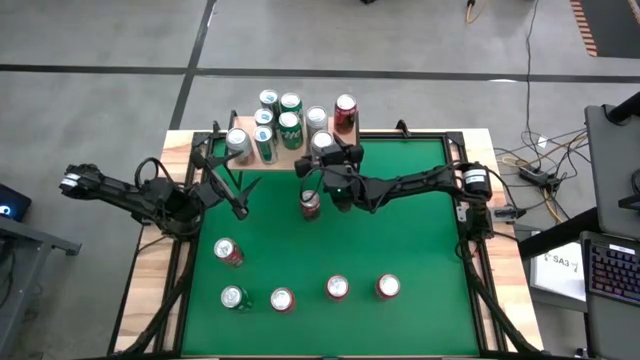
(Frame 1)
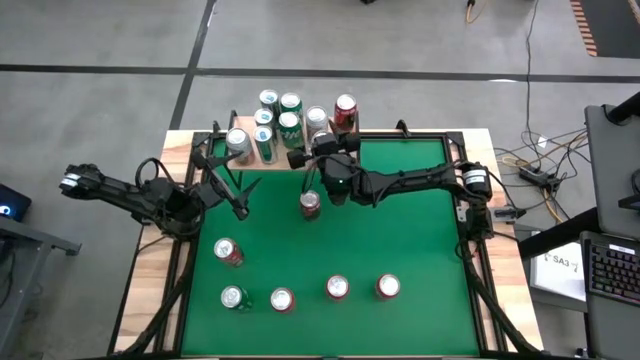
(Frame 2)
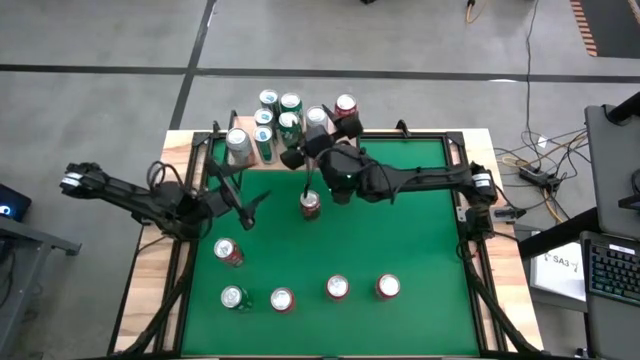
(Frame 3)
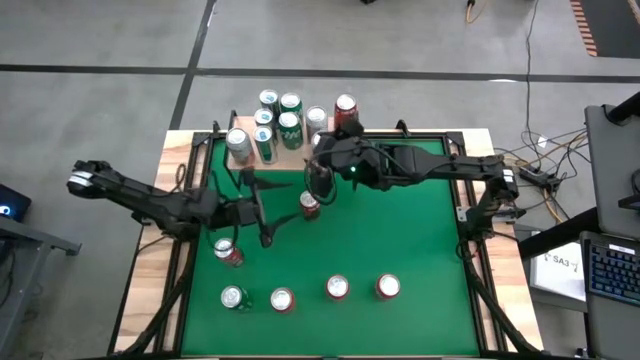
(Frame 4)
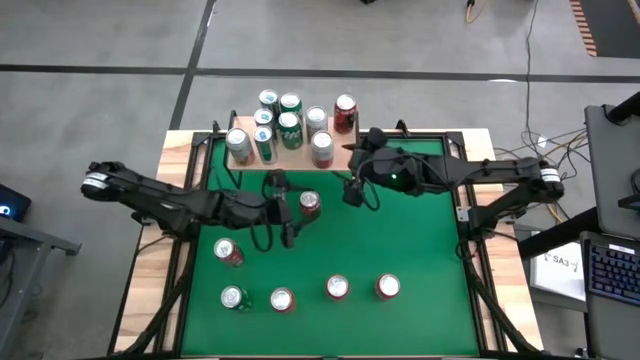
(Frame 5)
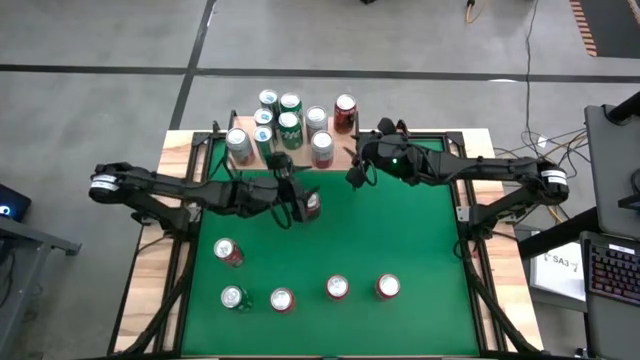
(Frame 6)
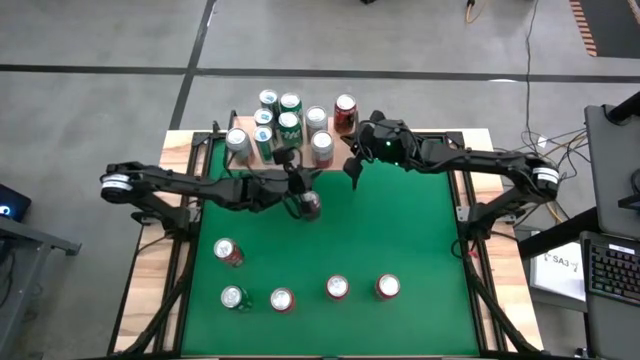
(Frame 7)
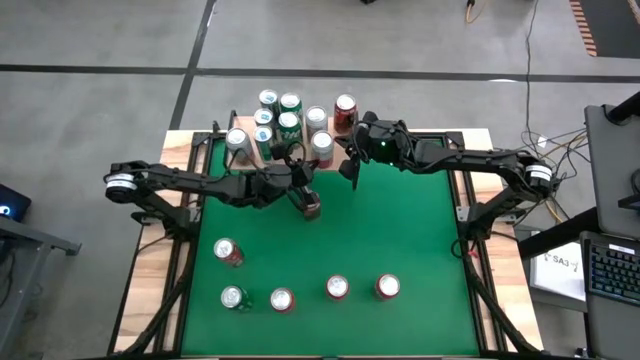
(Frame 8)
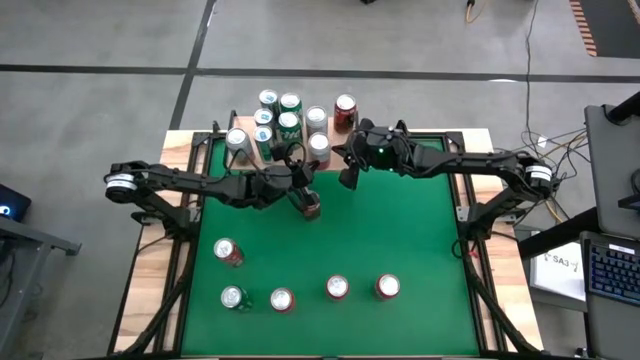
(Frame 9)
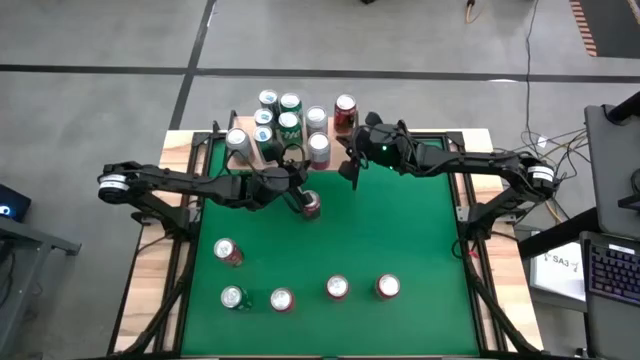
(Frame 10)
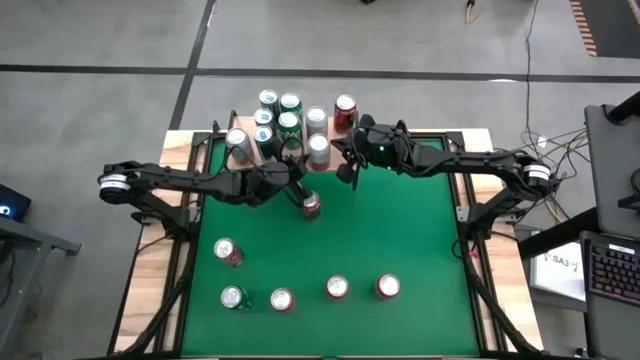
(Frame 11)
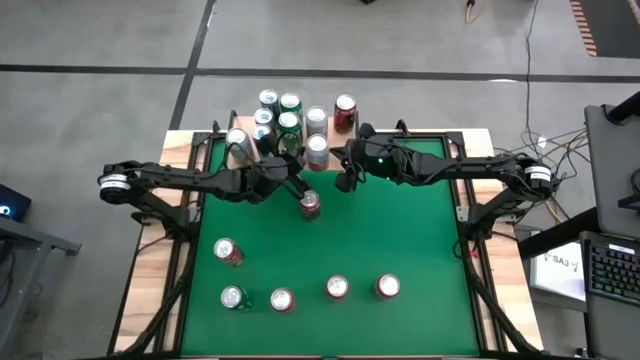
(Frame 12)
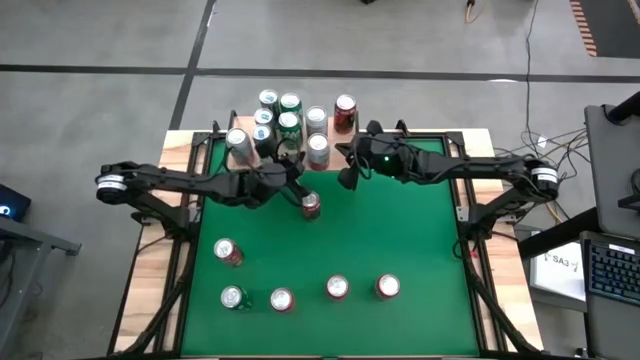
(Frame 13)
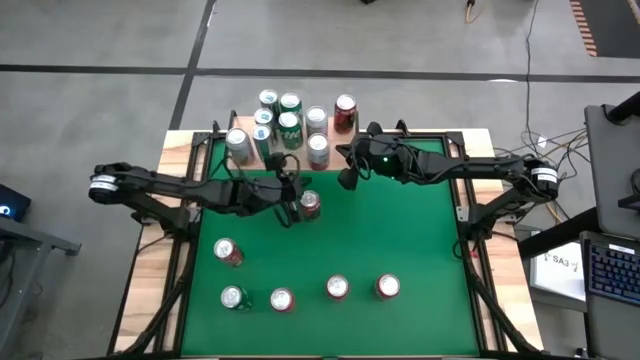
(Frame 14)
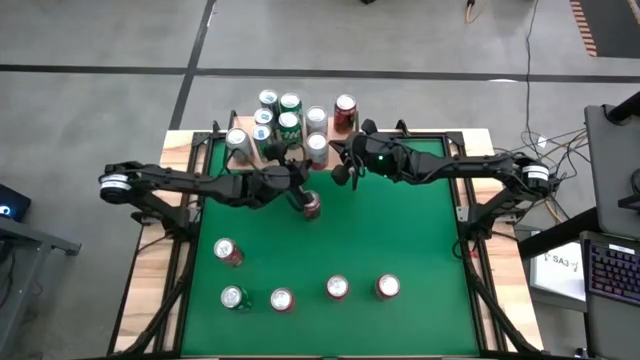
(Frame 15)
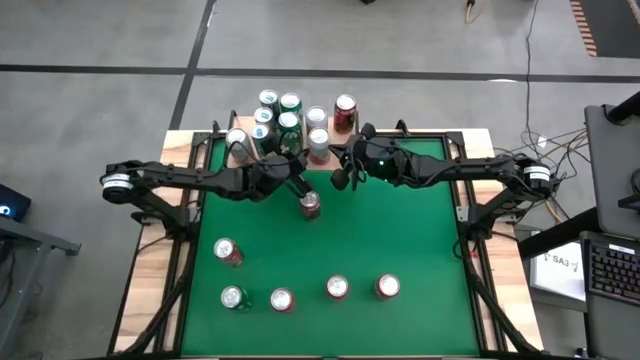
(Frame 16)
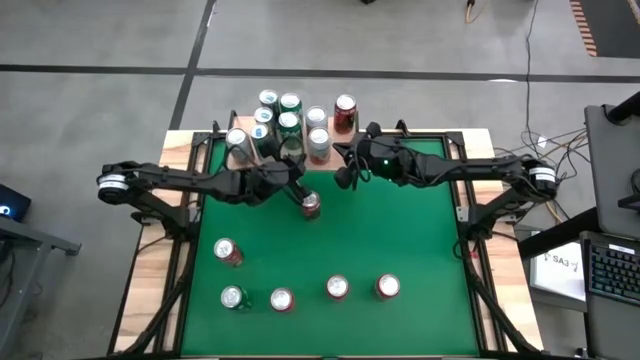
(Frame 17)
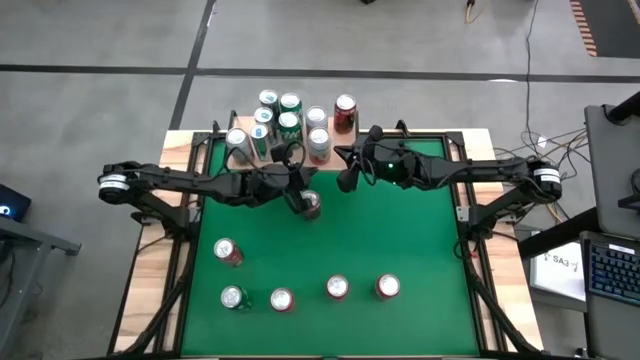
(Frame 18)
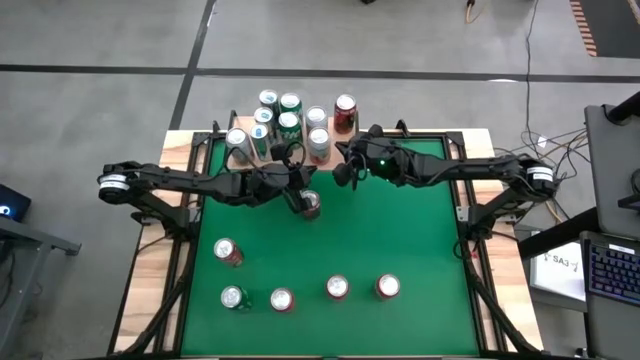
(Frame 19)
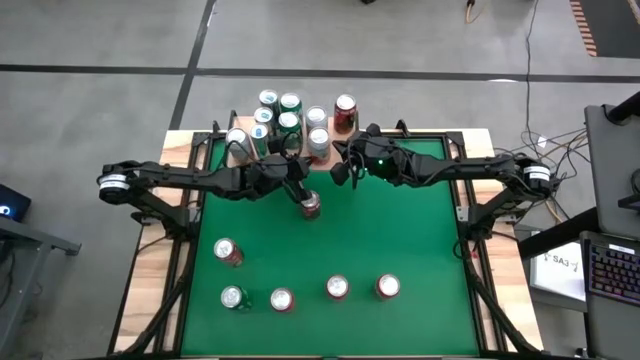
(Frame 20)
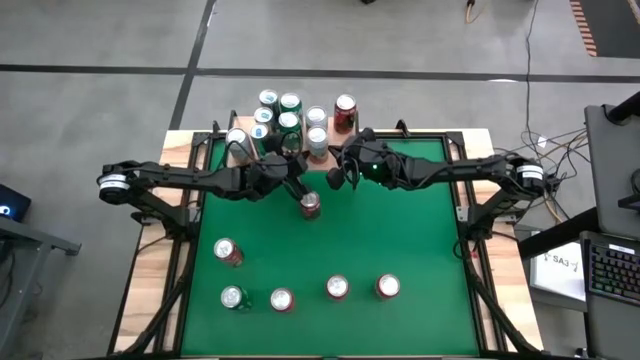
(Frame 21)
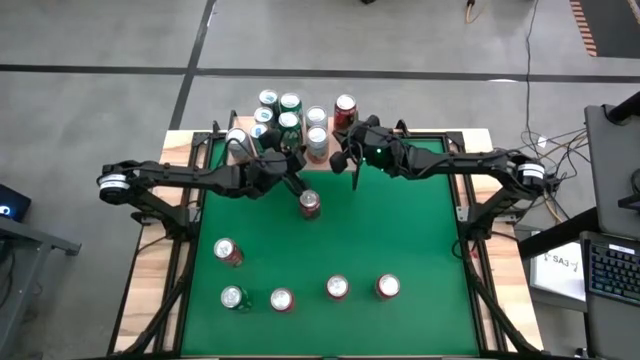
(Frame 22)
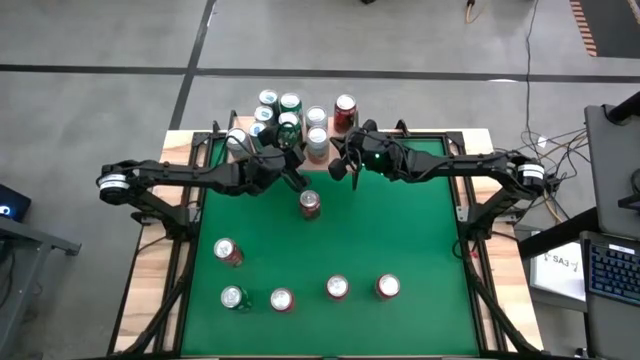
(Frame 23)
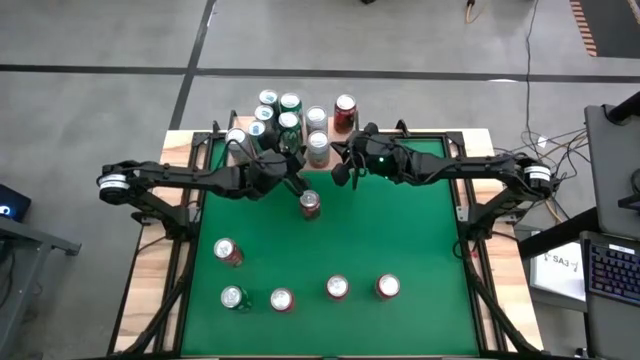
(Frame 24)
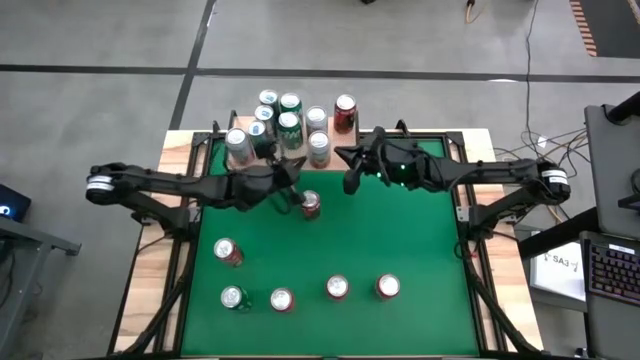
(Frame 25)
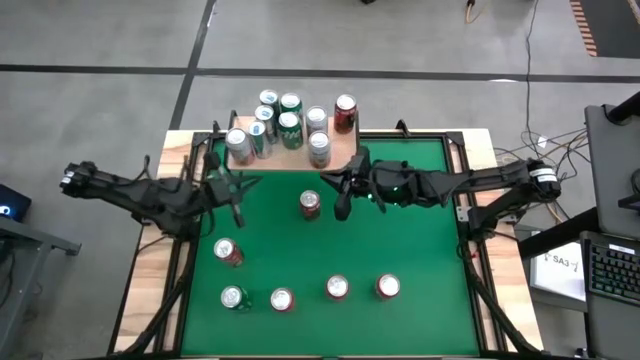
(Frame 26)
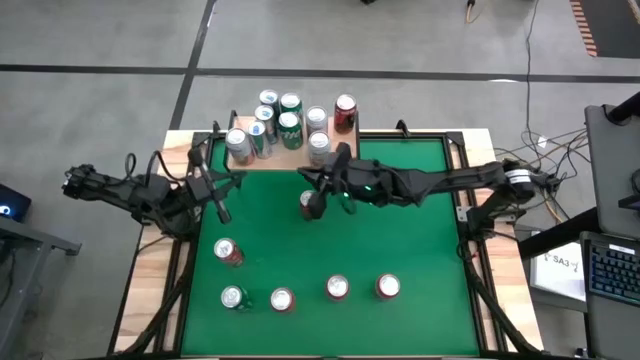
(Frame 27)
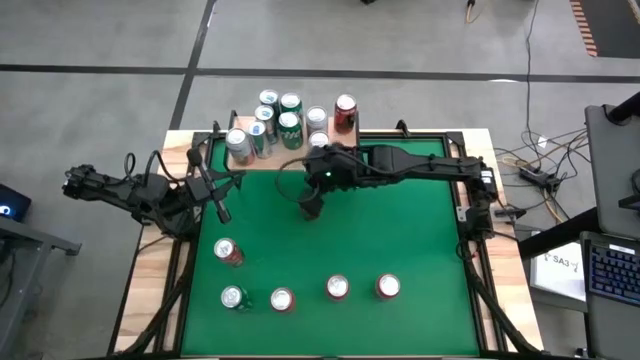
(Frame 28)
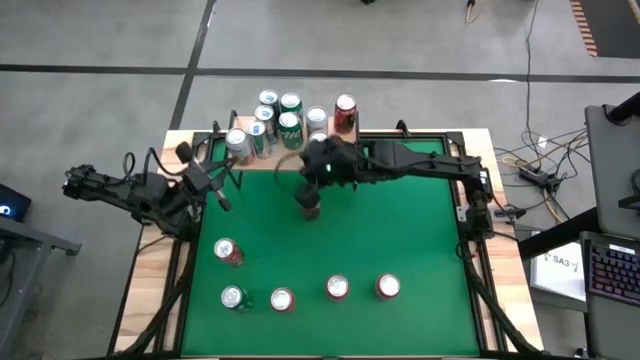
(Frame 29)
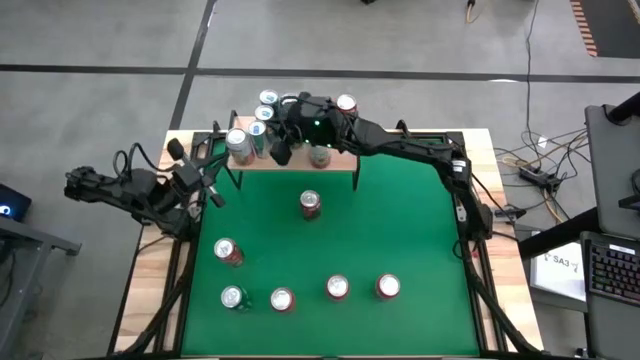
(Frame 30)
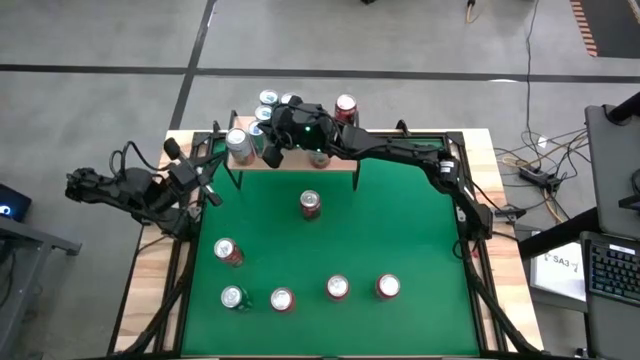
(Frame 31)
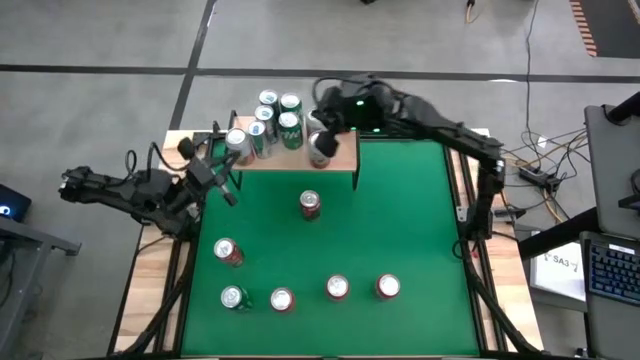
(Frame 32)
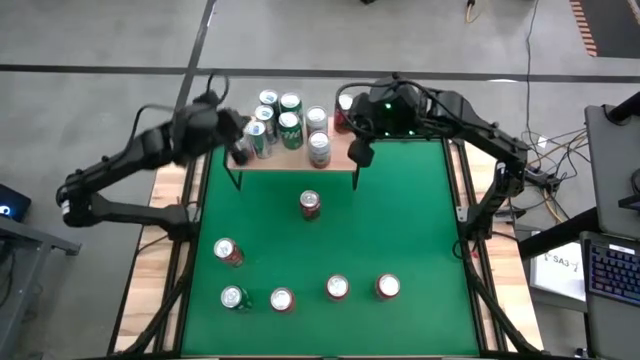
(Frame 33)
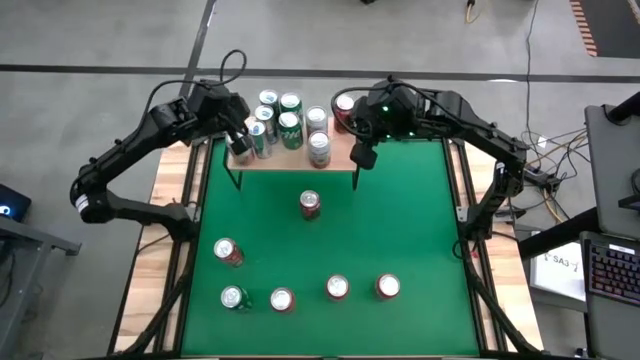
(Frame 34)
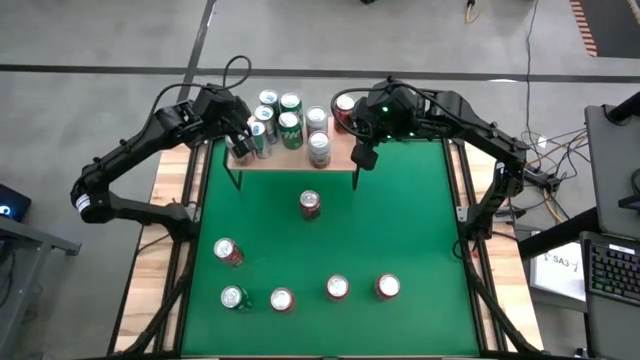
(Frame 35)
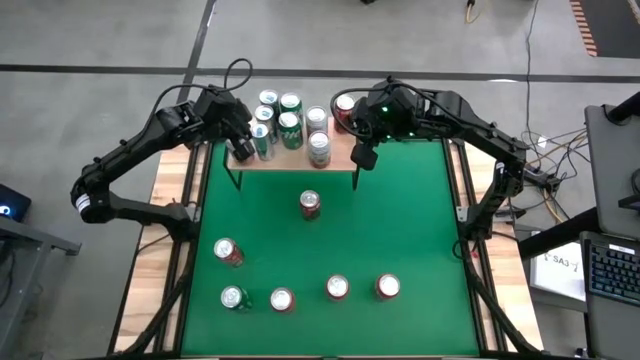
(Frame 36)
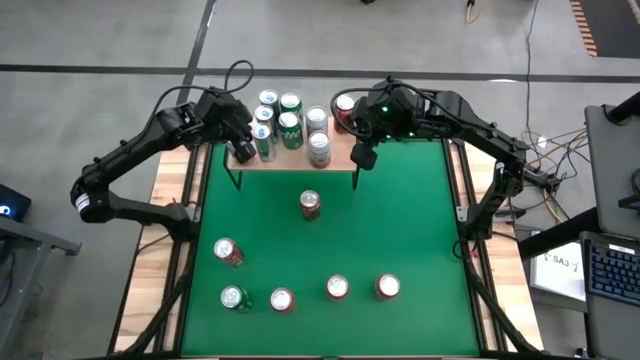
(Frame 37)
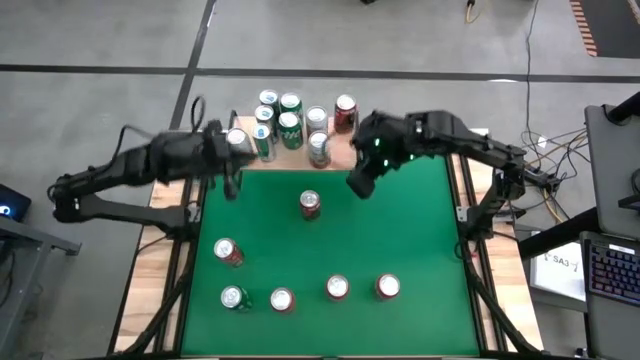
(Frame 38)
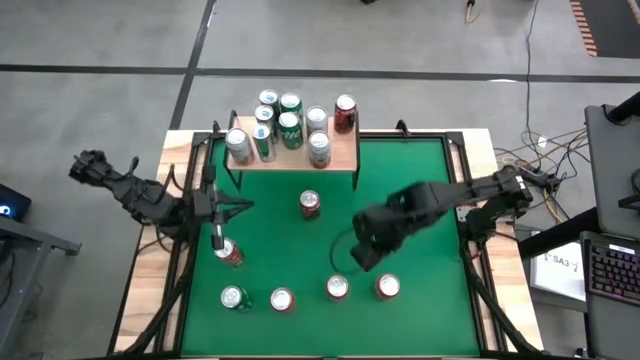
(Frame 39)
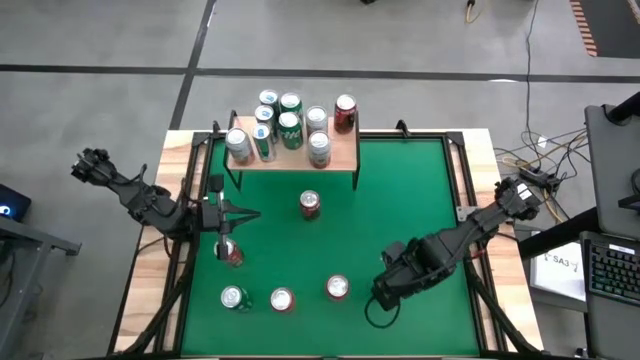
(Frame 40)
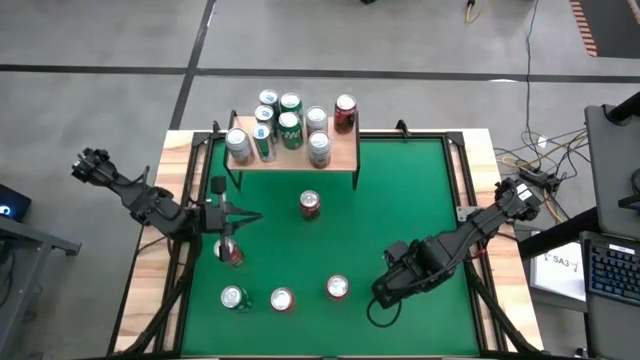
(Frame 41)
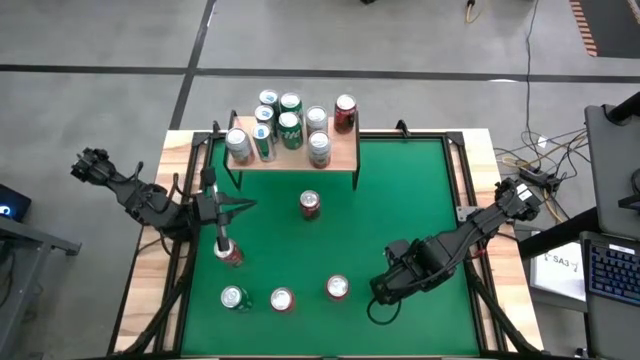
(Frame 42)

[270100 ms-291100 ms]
Task: Place canned beverage on shelf
Put the orange can on the shelf
